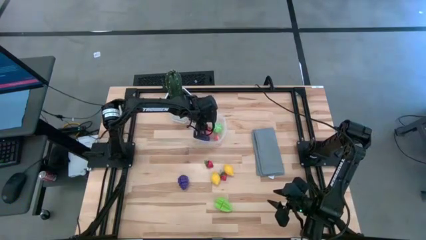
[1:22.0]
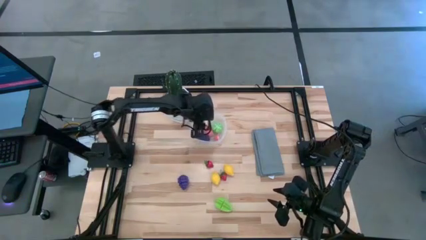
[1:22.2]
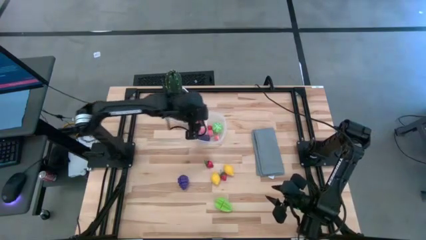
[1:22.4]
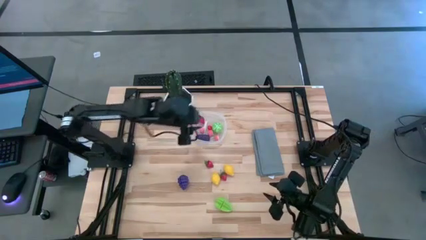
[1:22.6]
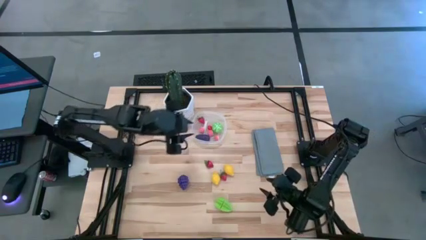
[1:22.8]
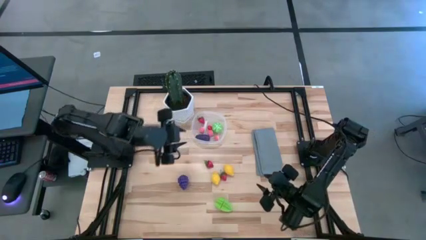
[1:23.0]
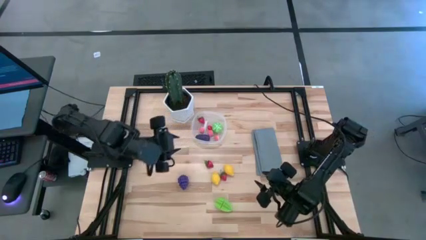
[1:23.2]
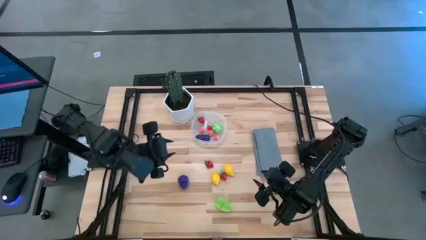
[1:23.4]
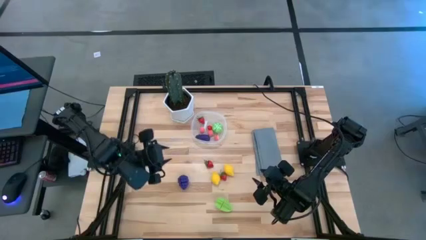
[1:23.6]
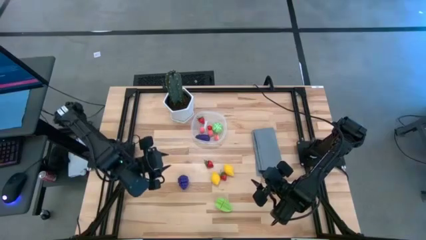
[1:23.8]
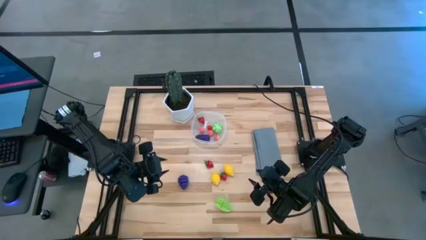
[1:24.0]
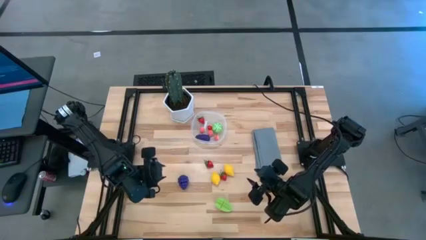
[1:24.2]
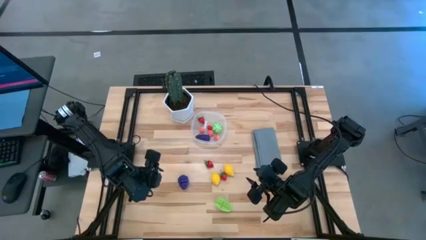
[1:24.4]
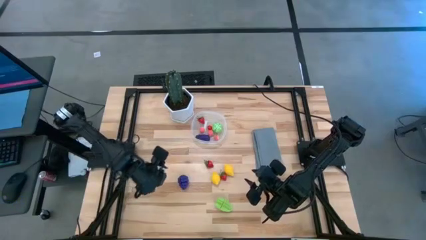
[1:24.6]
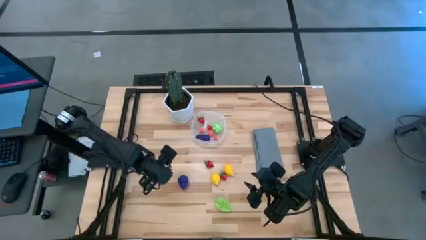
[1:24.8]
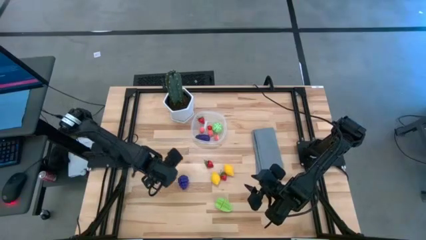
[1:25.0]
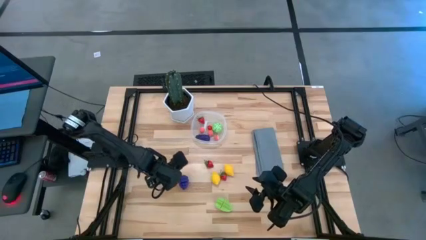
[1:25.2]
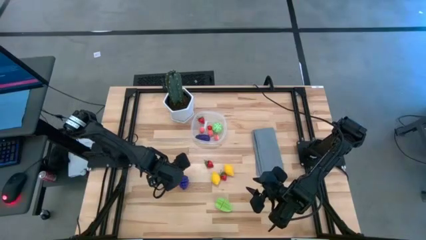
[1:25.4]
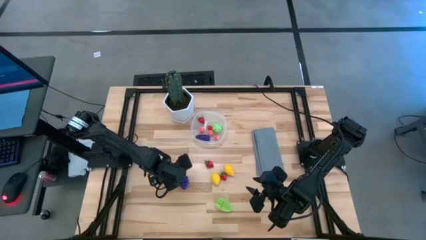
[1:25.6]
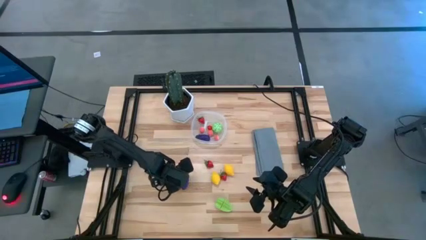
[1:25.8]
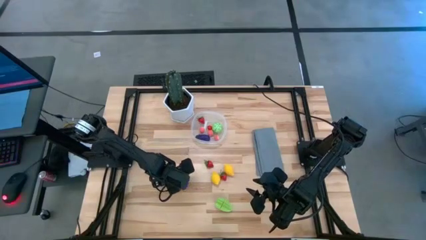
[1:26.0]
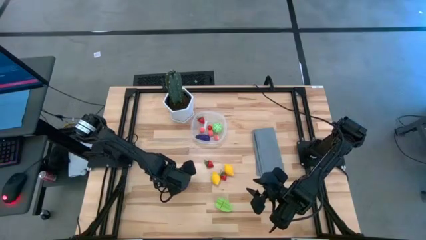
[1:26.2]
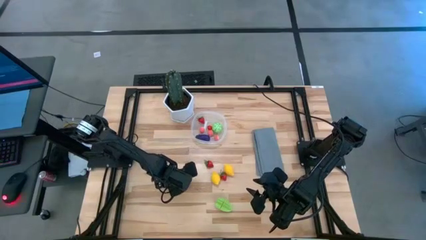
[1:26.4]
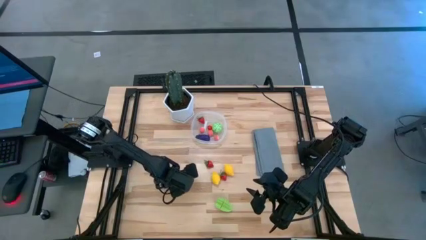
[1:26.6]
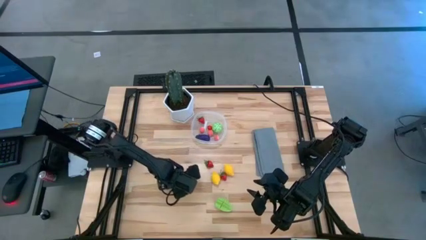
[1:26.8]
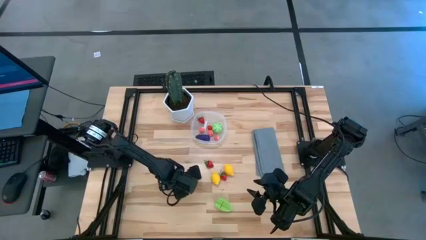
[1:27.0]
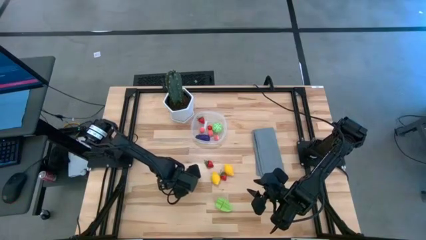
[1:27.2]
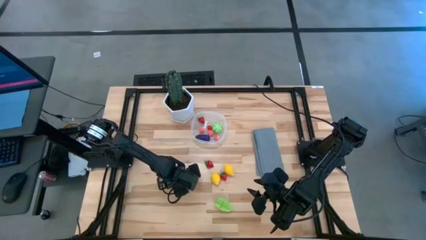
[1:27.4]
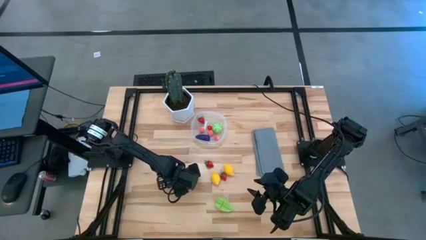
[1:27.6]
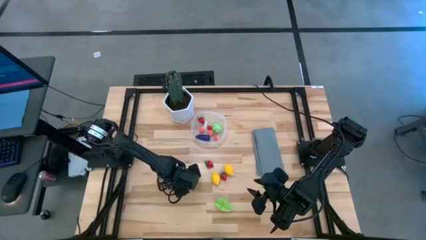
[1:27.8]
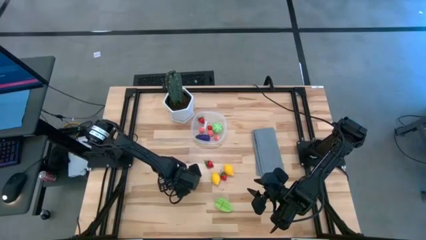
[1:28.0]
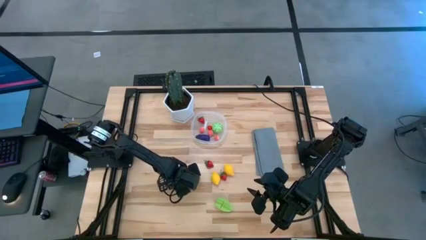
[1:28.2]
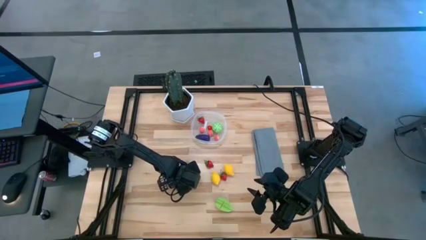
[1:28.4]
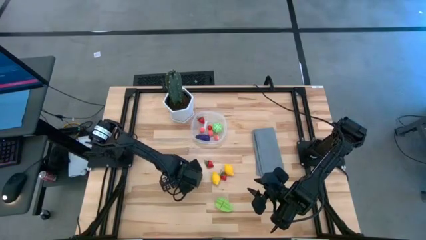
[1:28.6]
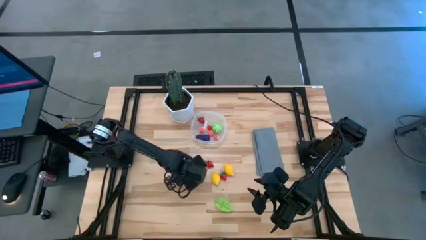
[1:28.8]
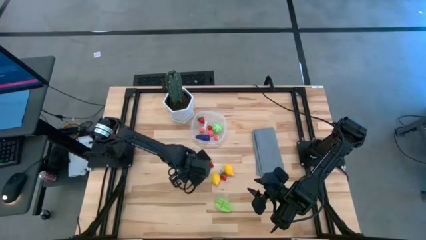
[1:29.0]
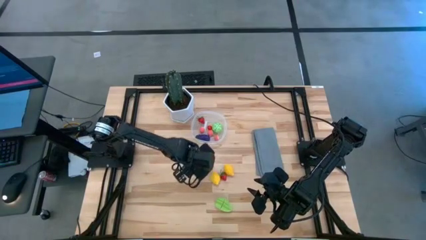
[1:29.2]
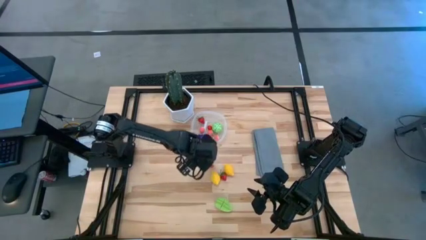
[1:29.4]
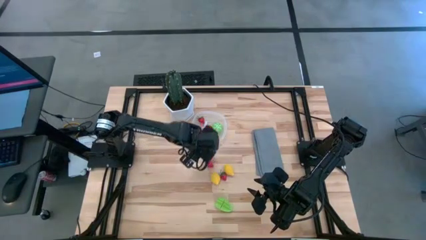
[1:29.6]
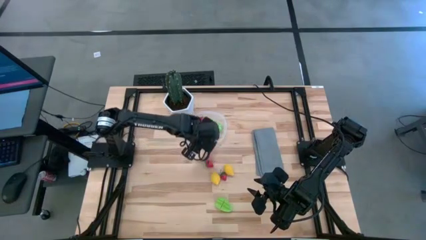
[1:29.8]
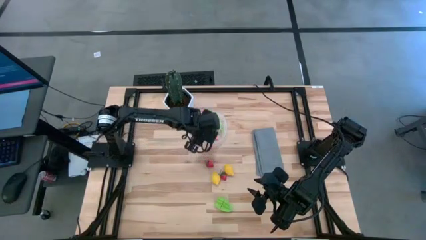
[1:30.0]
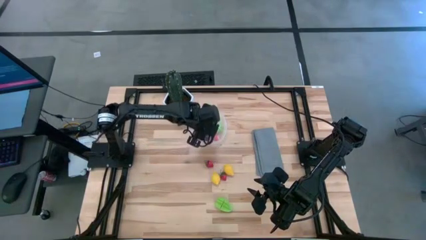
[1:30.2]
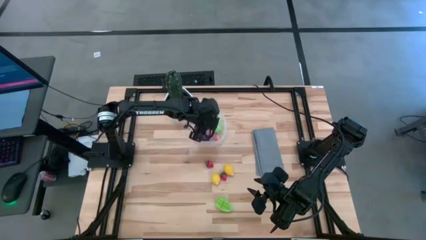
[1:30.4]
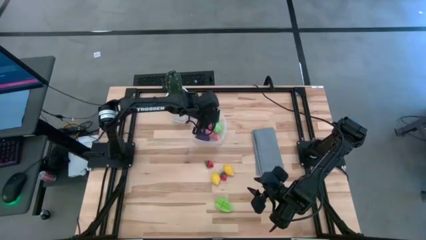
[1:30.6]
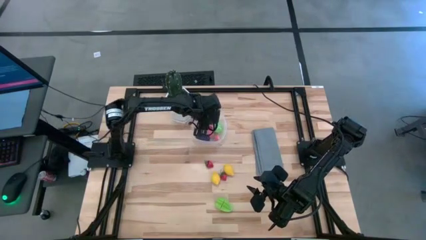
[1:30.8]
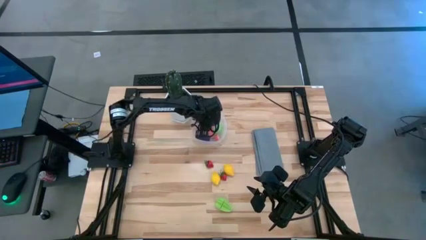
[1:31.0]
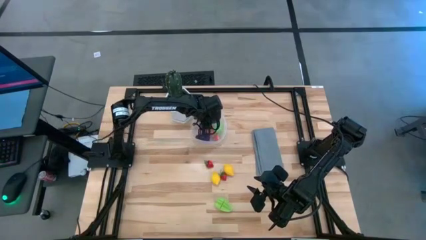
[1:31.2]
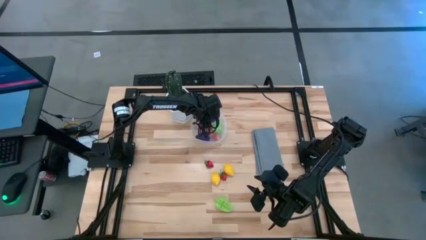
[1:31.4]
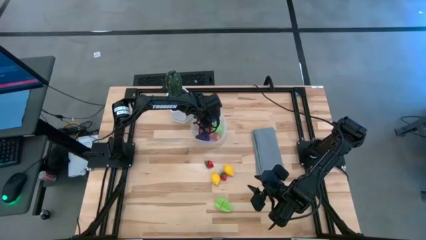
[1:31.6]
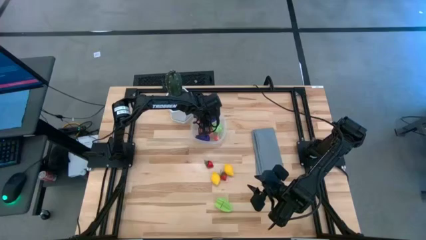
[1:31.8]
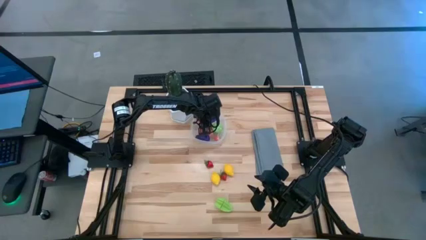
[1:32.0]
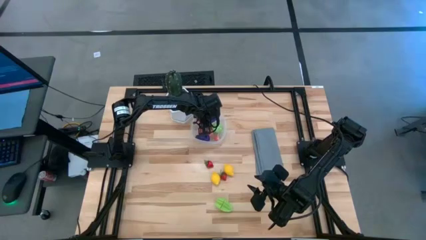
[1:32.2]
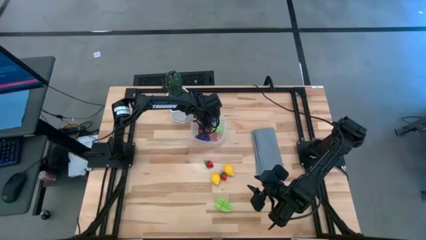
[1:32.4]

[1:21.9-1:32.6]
Task: Pick and placing Produce into tupperware
Put the blueberry into the transparent bin

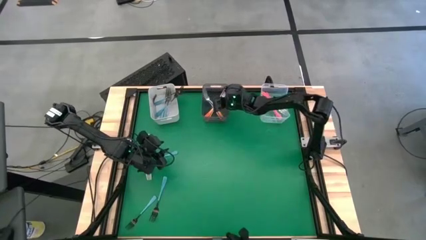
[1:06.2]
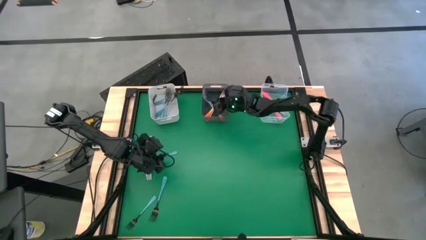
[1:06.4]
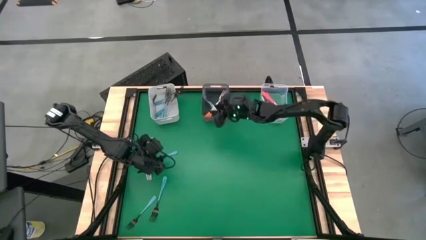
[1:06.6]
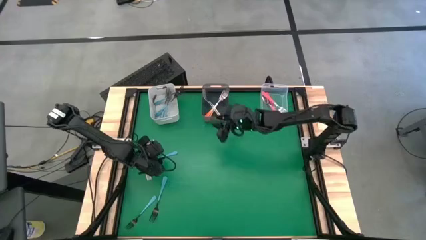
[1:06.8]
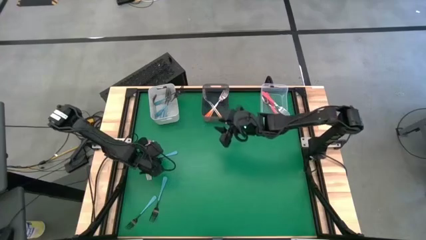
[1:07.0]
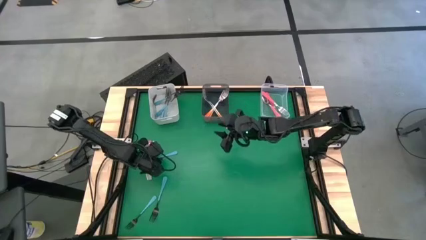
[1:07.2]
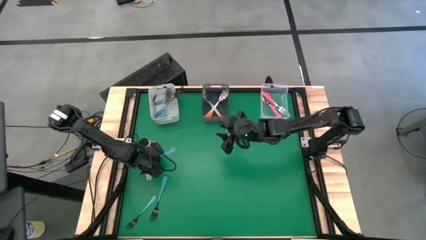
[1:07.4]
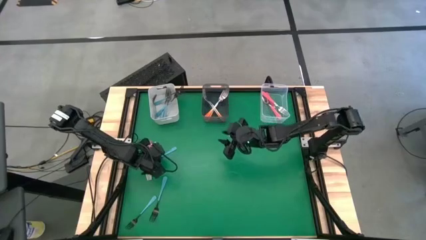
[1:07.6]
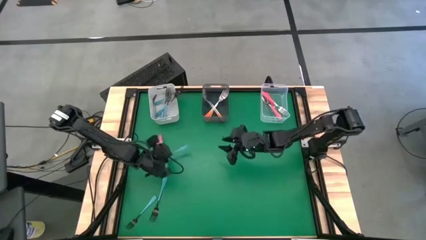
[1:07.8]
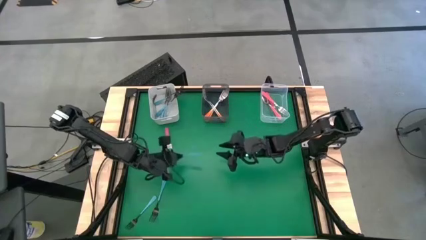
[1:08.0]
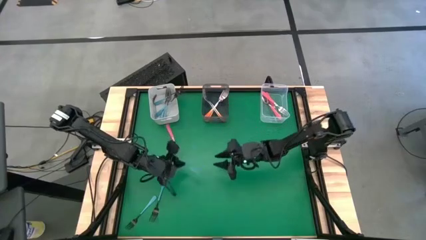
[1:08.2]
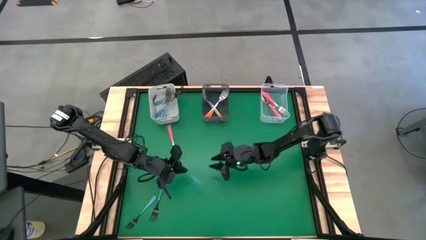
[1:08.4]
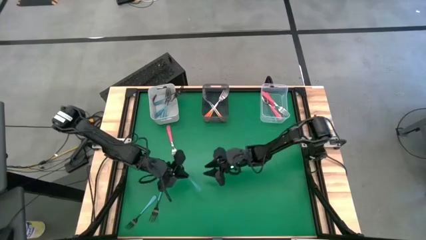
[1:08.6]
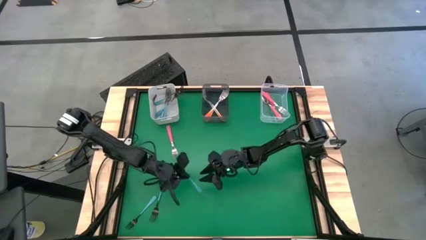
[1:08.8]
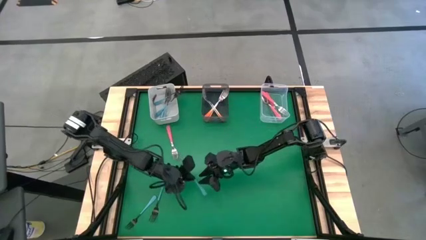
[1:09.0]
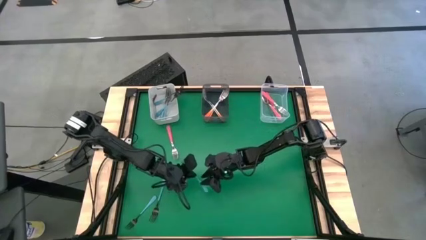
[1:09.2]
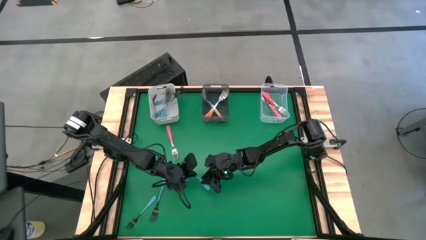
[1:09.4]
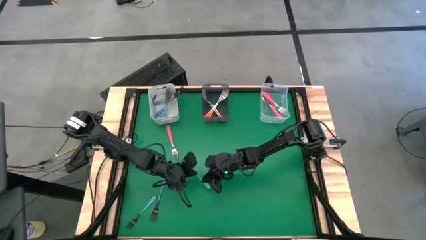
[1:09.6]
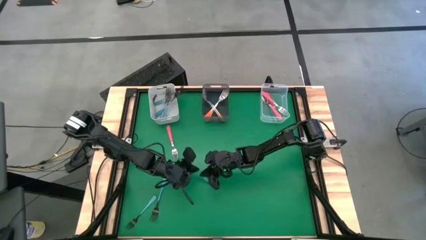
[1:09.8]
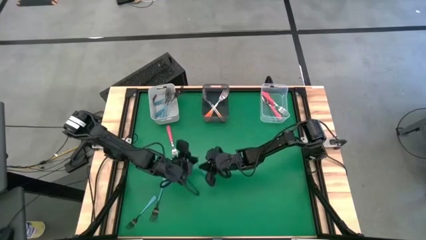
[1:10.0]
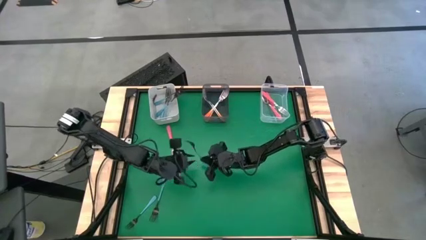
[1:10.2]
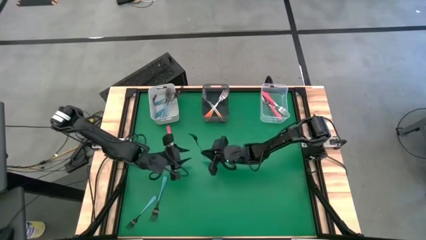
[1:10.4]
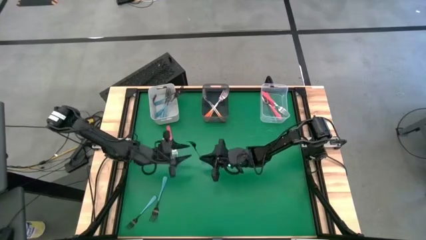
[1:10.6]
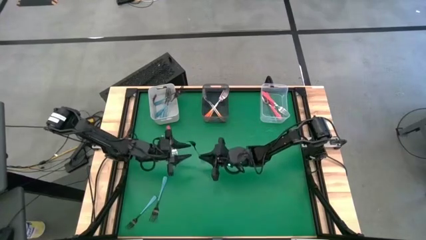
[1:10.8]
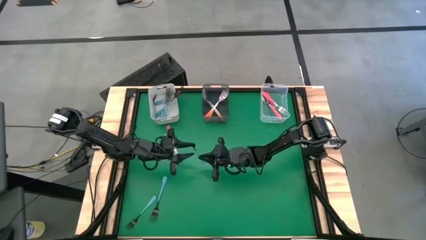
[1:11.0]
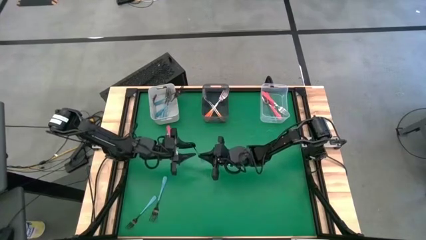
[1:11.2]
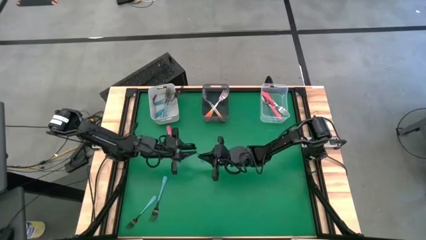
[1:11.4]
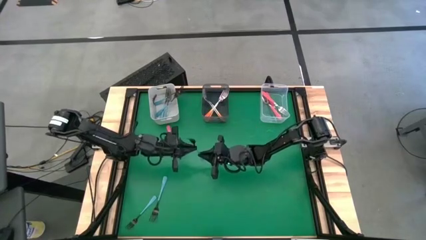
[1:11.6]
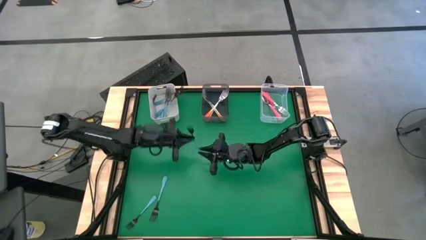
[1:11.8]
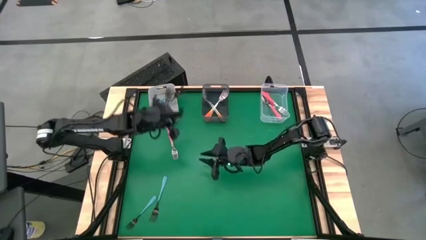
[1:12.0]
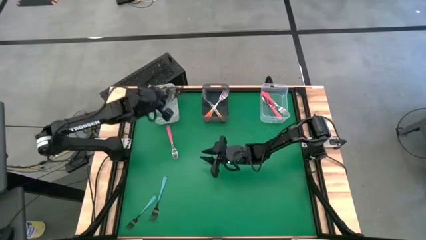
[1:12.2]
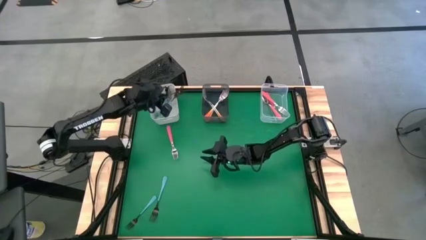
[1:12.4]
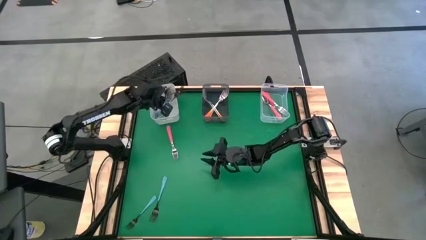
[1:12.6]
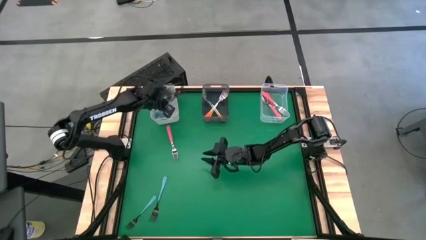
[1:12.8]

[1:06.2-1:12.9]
Task: Sort silverware by color (type)
Put the blue fork into the white bin
